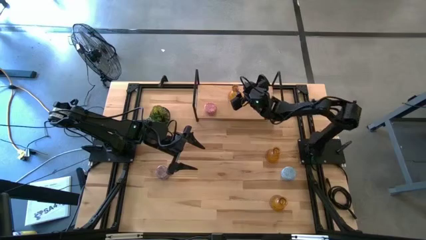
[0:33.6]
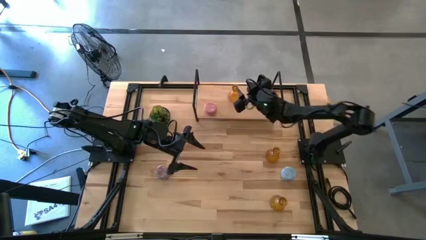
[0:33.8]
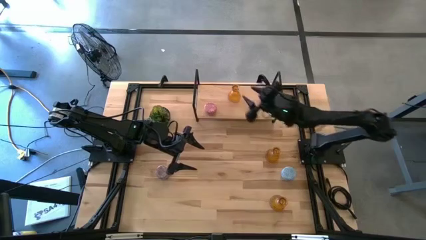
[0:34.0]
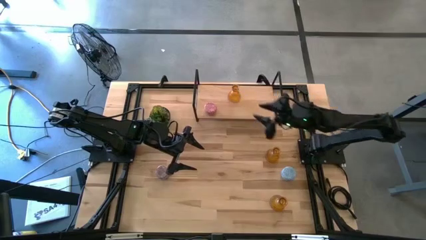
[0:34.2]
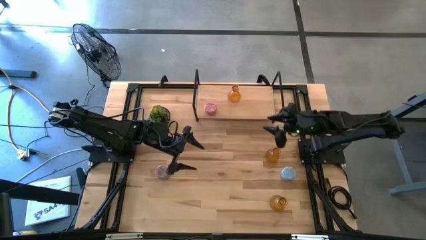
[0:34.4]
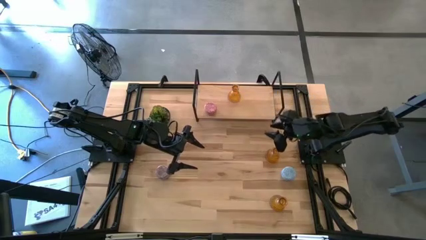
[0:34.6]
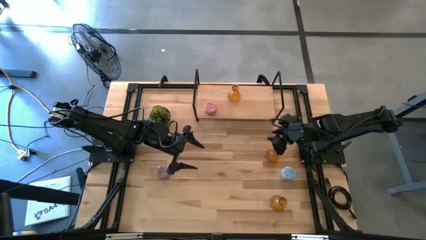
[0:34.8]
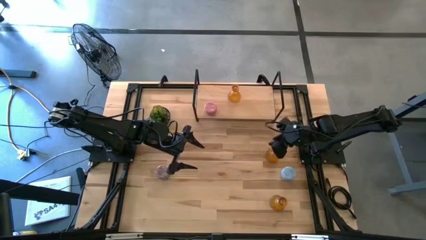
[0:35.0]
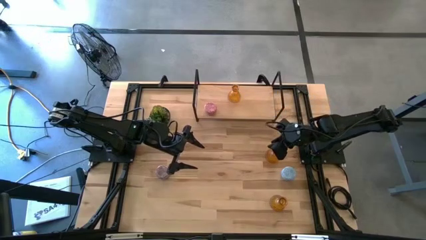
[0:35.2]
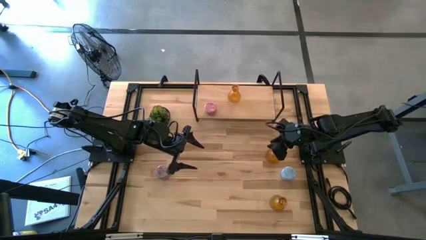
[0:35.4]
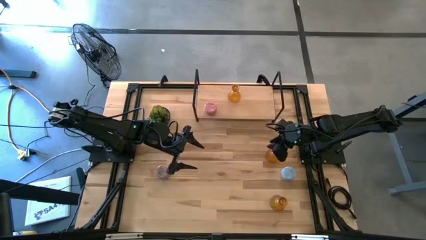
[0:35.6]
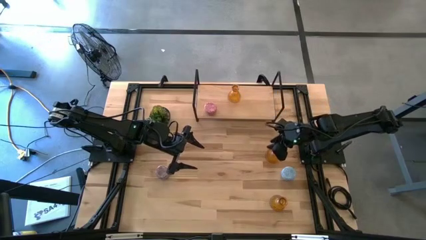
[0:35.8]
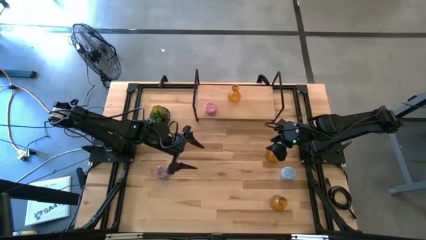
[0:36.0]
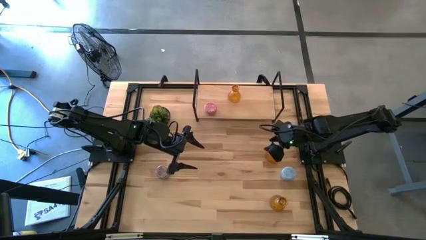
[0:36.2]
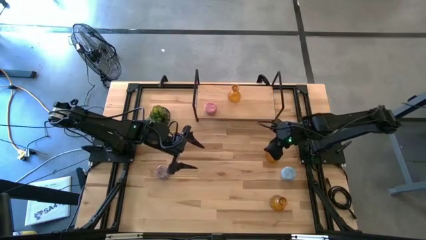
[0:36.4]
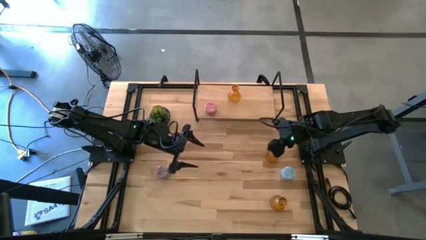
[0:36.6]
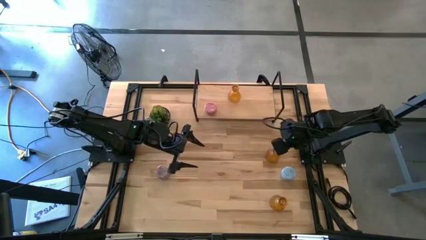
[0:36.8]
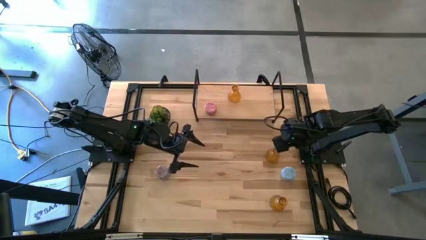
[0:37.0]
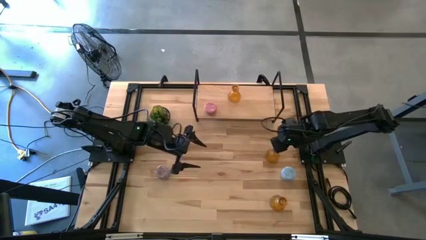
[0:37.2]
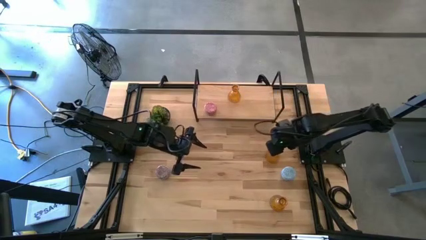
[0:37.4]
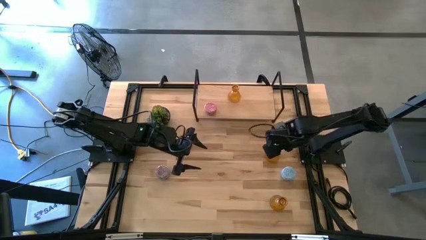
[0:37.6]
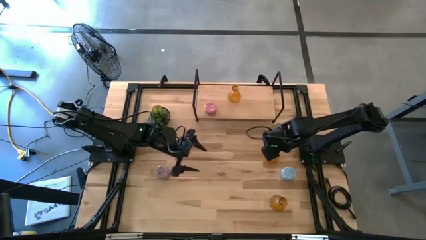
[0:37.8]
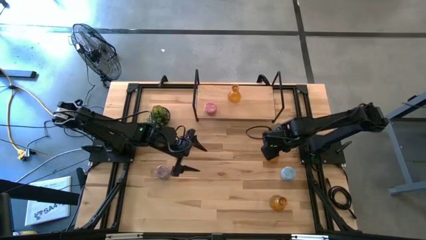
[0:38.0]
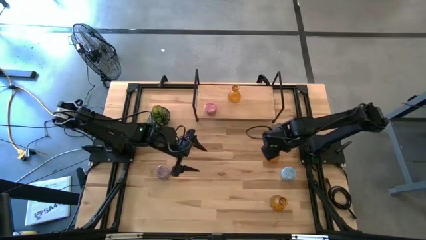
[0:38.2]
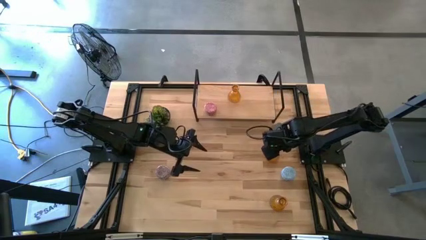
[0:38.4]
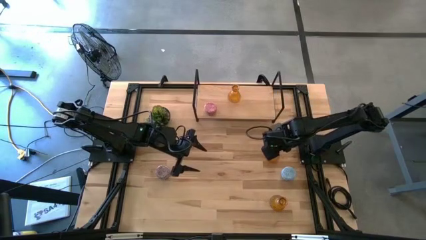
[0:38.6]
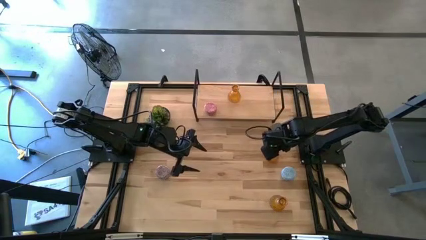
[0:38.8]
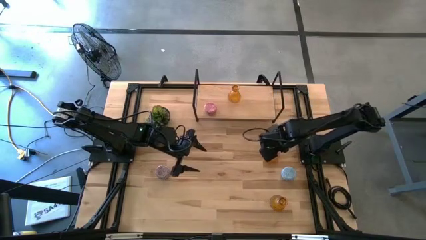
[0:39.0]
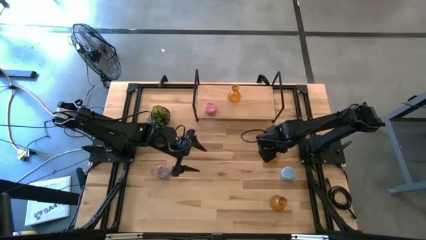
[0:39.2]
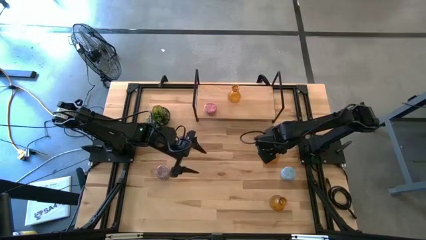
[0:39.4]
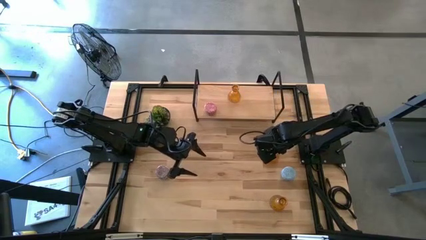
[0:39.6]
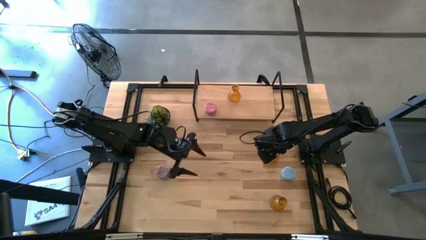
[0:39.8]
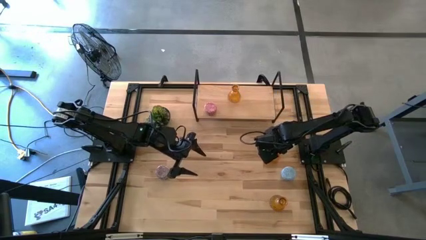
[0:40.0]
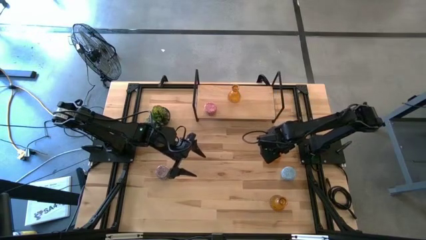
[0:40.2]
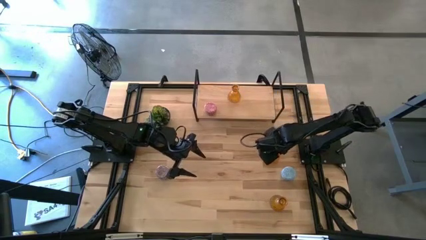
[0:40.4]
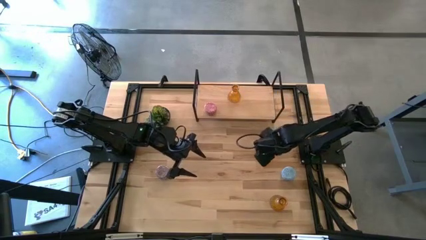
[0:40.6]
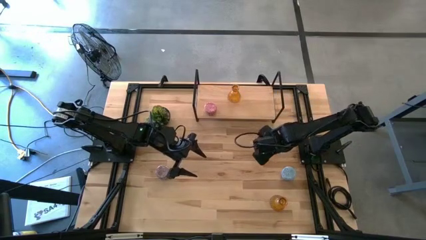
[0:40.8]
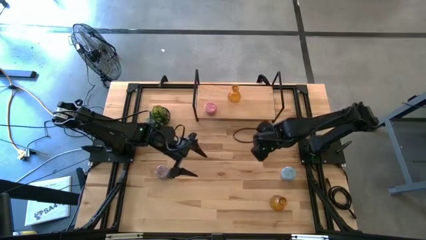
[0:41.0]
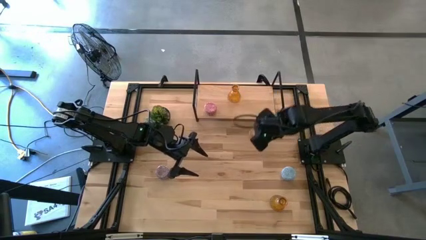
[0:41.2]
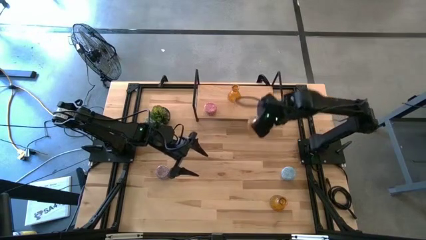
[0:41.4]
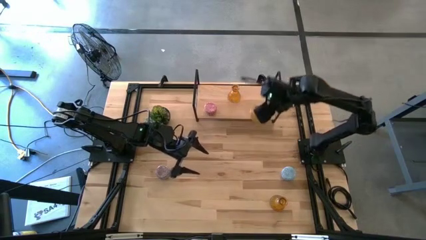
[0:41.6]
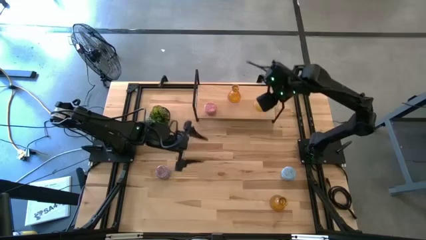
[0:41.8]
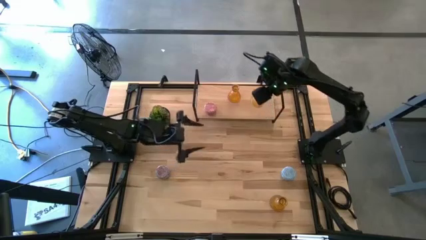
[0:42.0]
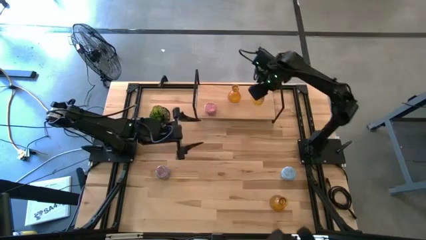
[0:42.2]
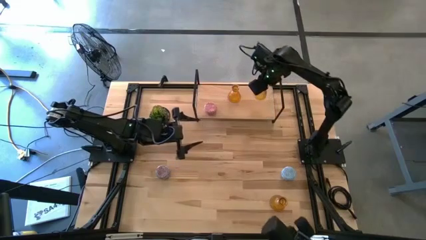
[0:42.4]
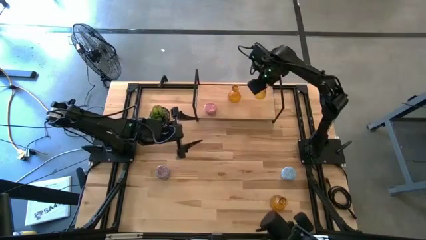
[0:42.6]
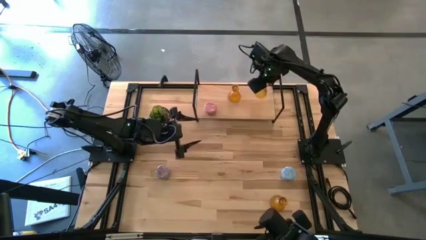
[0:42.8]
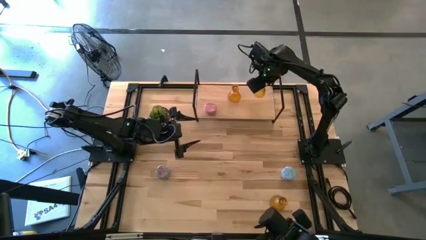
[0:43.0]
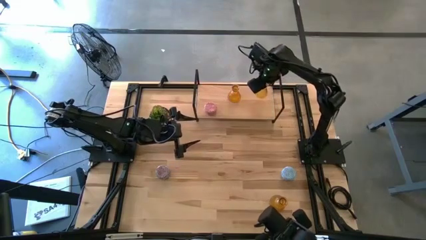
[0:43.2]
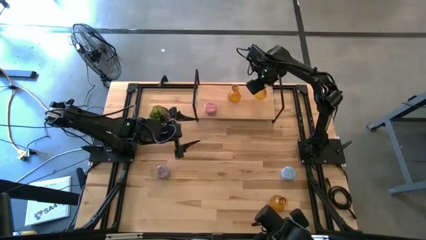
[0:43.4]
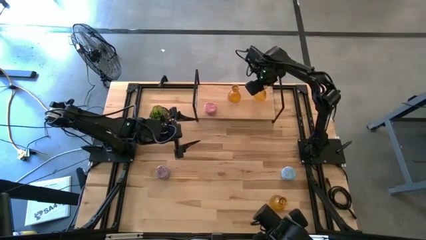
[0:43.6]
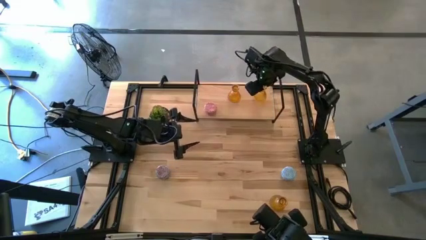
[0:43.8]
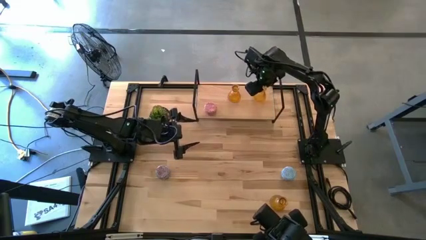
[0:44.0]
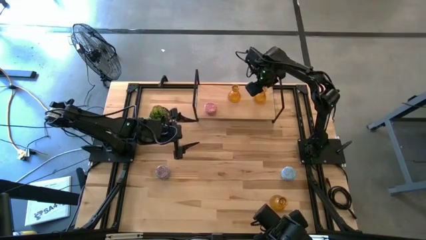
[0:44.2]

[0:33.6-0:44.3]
Task: Pick & Place candle stick holders
Put the top orange glass candle holder on the shelf

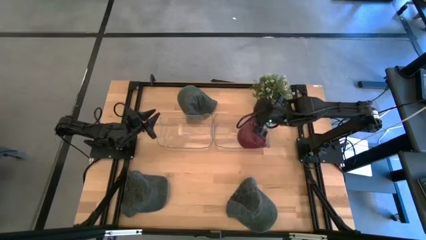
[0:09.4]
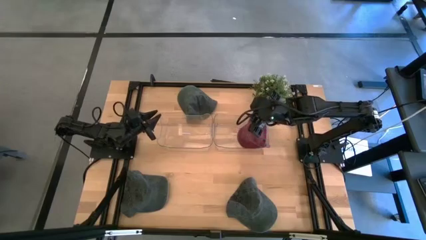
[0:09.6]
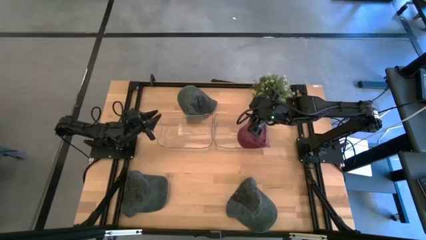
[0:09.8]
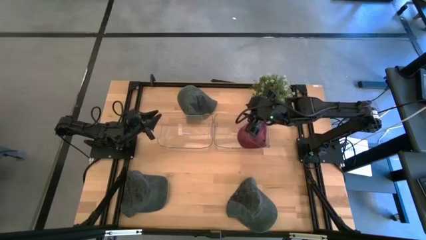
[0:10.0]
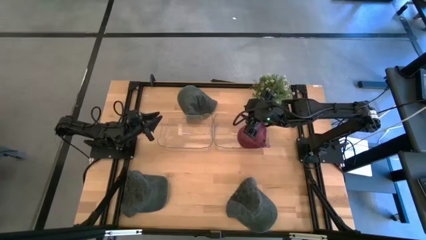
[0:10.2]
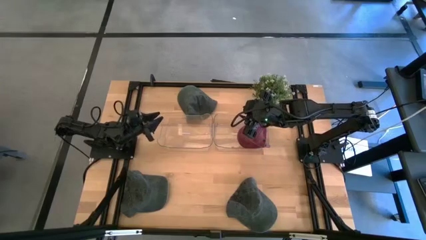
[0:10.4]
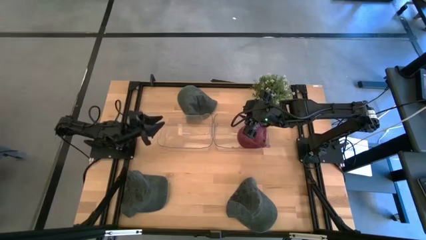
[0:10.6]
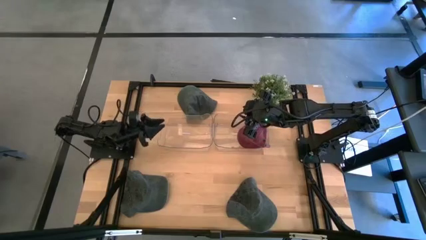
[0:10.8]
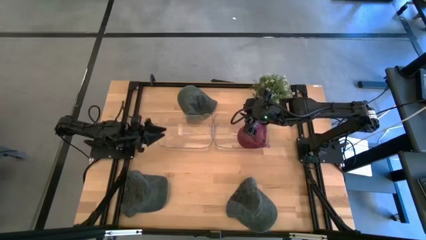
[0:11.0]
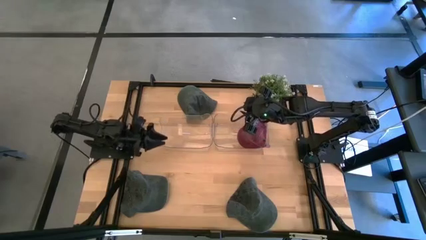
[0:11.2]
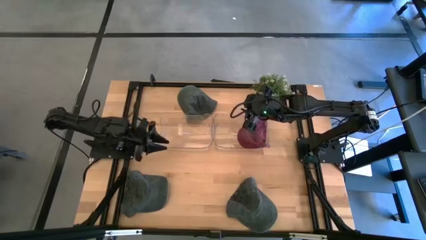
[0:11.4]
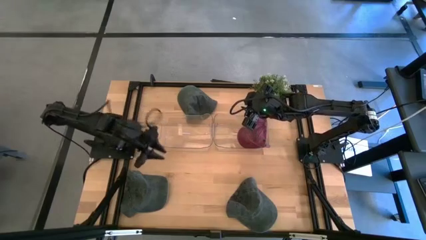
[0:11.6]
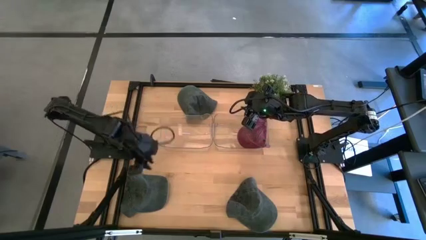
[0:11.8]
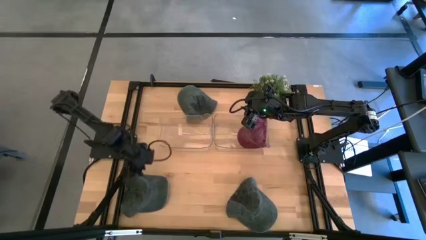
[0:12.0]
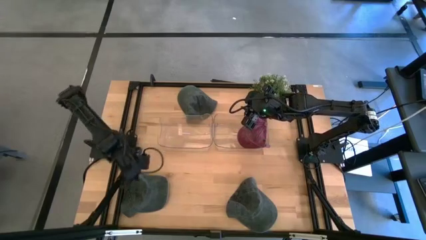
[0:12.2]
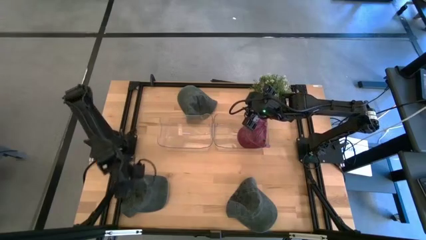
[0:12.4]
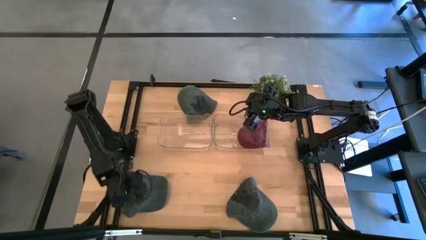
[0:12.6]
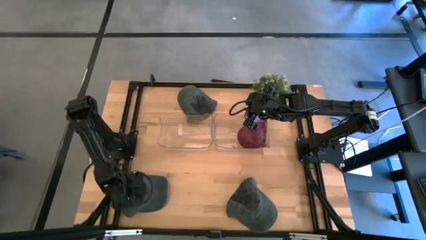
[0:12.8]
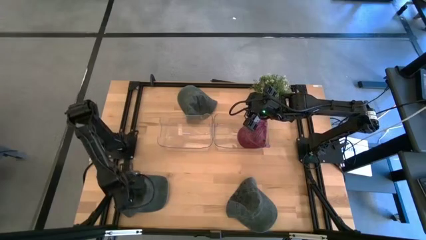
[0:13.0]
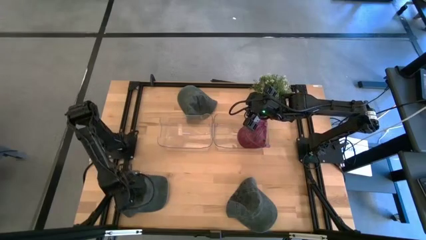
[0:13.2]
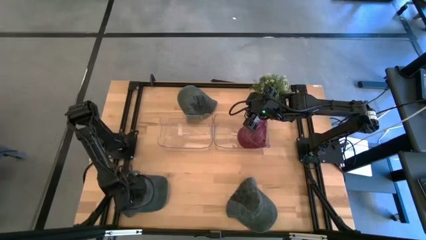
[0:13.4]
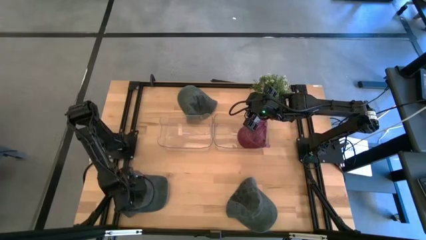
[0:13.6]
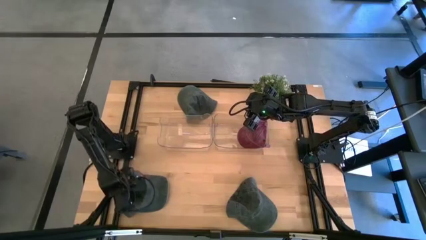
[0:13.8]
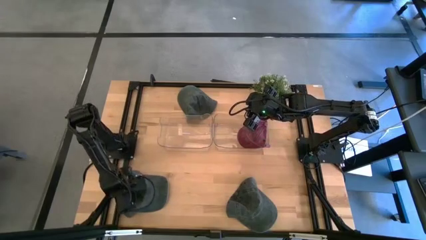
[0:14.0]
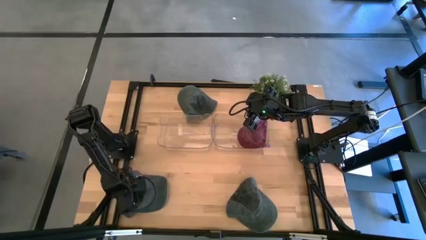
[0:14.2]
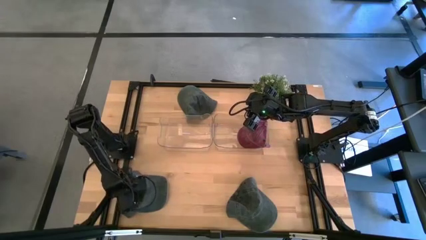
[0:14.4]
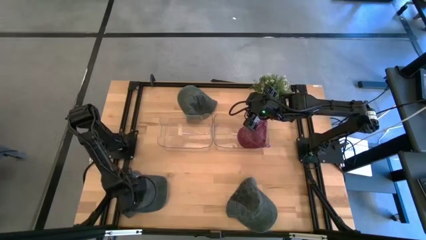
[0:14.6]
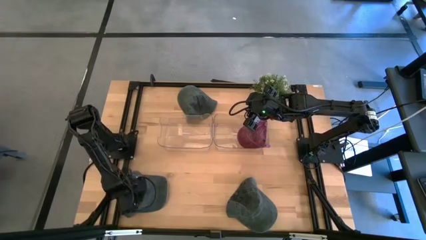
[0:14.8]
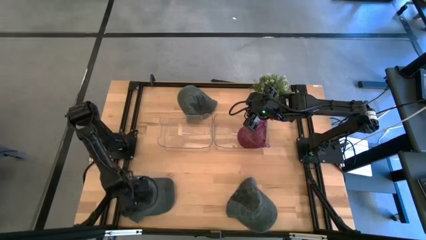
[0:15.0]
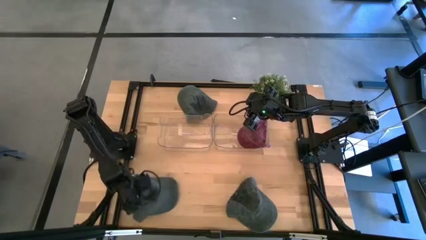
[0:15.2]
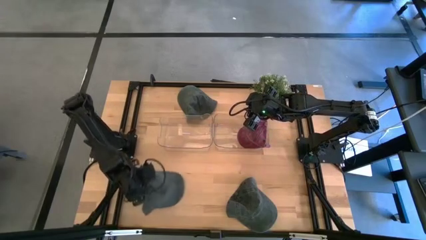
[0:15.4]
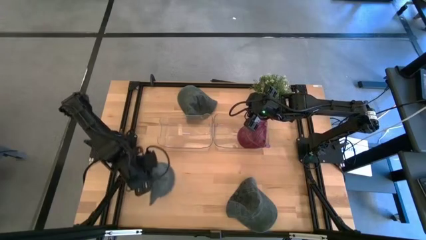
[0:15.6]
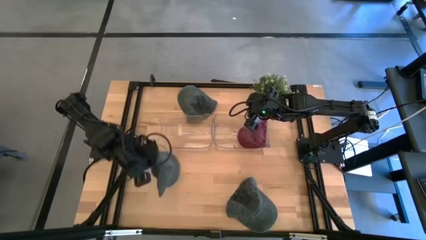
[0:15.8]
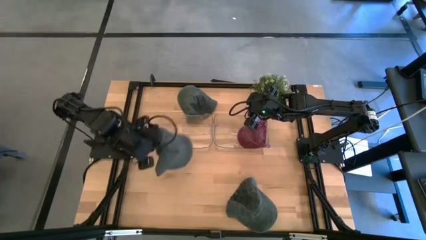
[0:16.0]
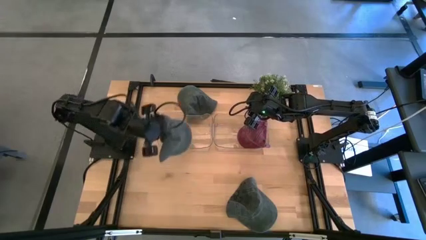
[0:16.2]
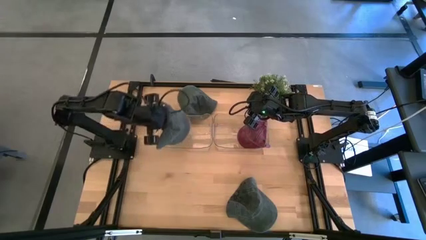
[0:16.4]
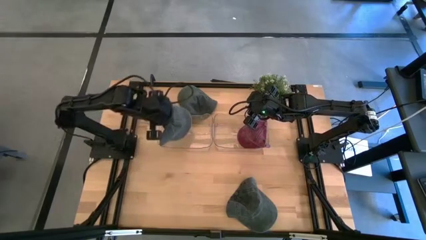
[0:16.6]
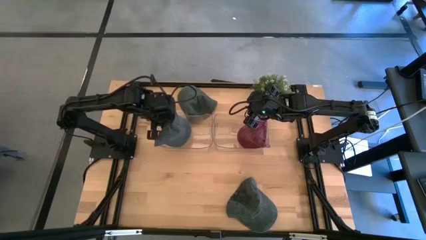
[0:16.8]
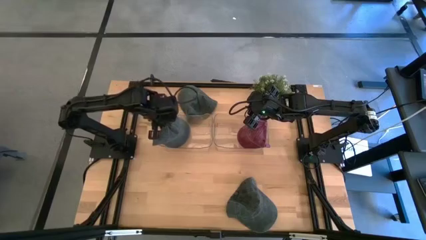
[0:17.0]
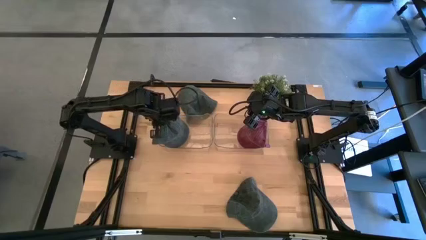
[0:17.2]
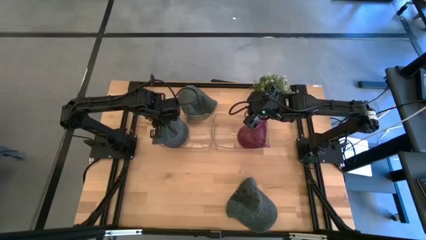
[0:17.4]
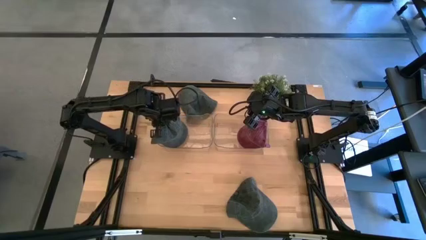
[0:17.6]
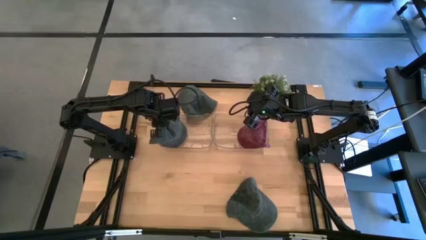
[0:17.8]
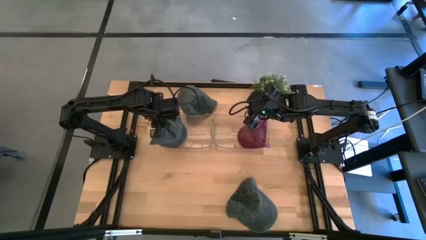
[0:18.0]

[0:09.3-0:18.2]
Task: Pick & Place hat
Put the bottom left black cap into the left transparent bin
